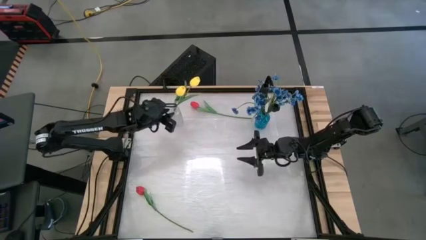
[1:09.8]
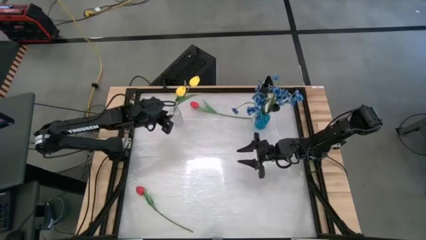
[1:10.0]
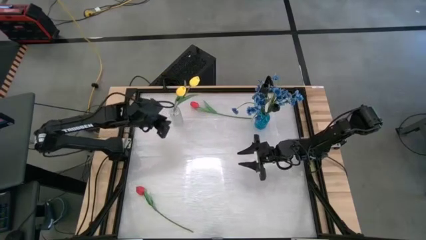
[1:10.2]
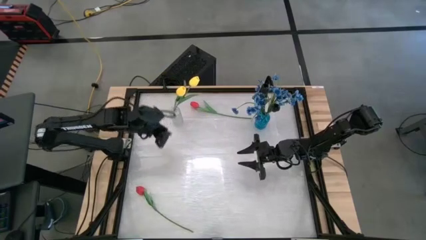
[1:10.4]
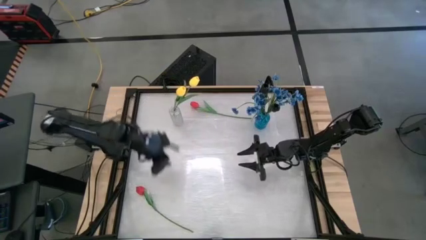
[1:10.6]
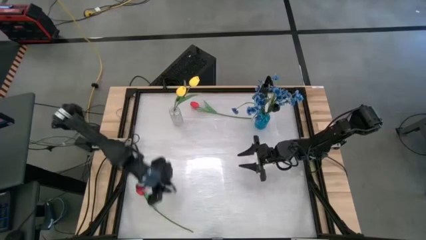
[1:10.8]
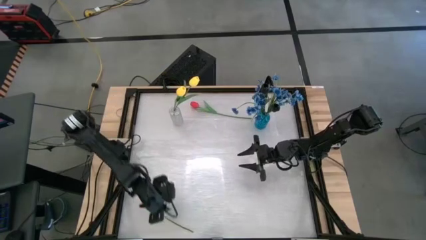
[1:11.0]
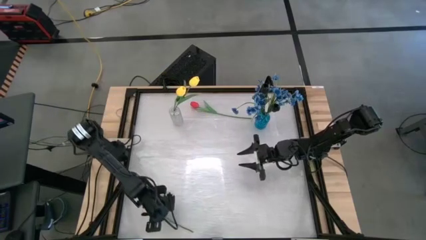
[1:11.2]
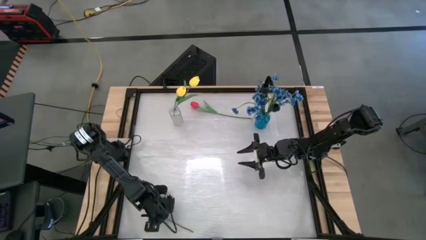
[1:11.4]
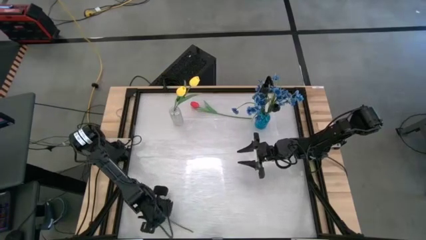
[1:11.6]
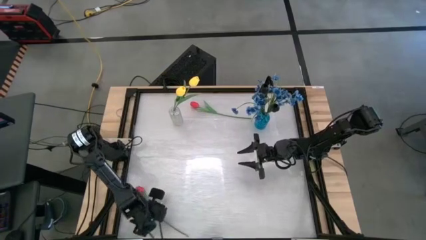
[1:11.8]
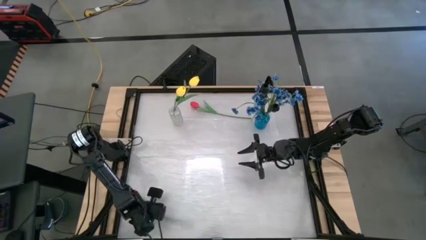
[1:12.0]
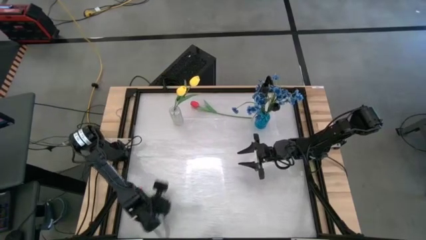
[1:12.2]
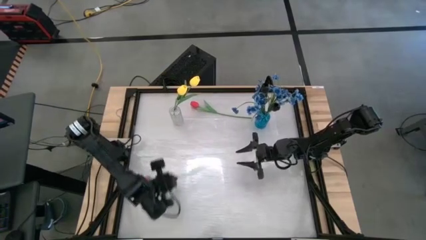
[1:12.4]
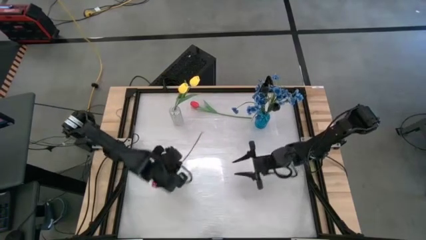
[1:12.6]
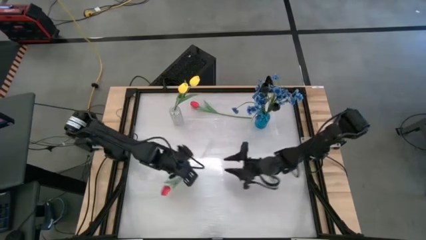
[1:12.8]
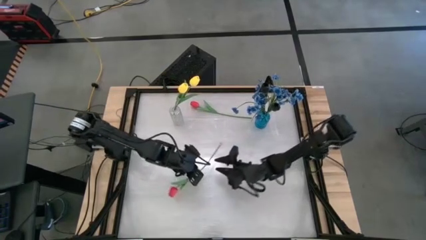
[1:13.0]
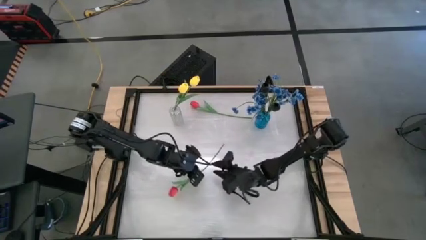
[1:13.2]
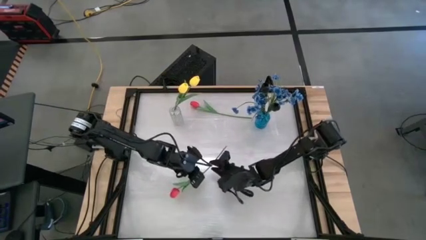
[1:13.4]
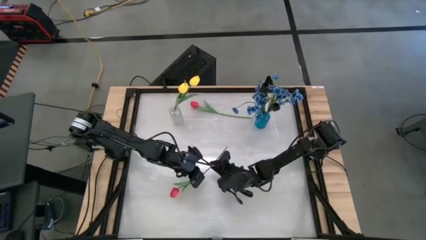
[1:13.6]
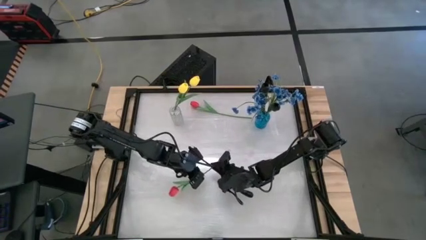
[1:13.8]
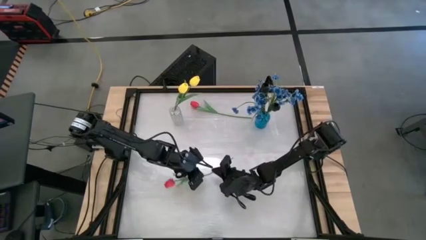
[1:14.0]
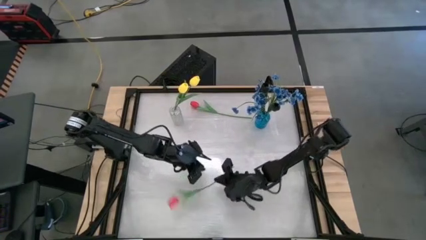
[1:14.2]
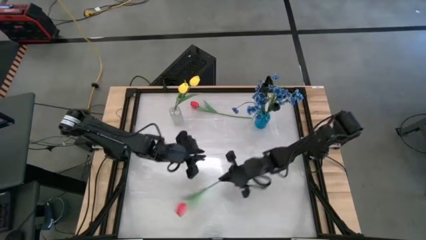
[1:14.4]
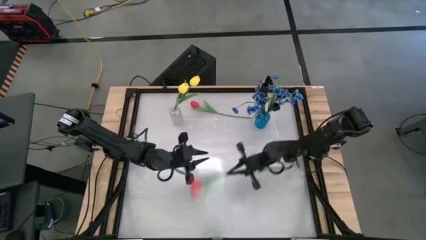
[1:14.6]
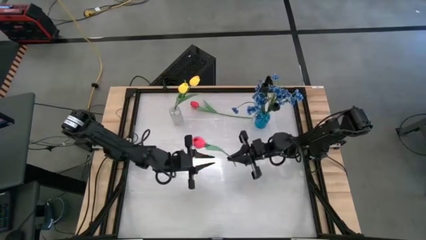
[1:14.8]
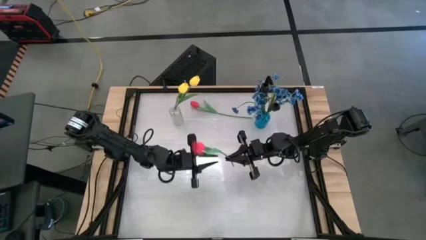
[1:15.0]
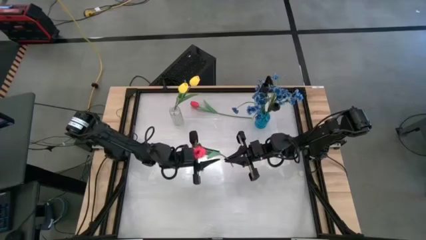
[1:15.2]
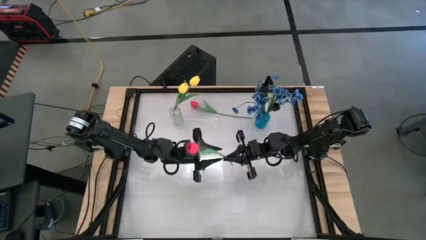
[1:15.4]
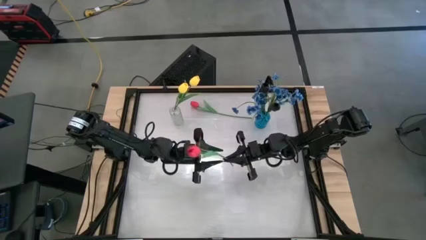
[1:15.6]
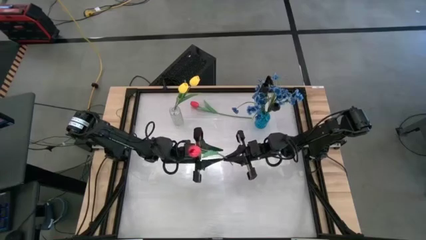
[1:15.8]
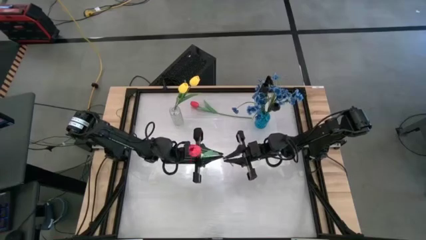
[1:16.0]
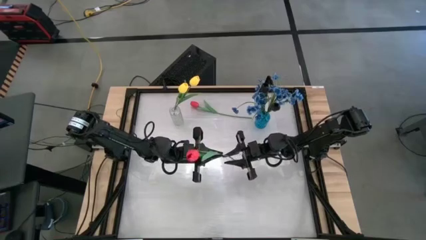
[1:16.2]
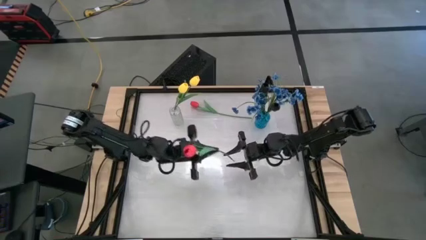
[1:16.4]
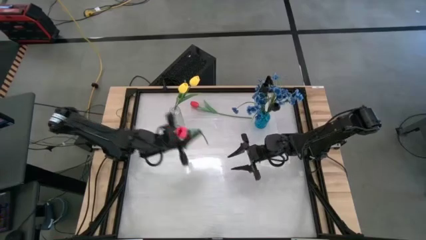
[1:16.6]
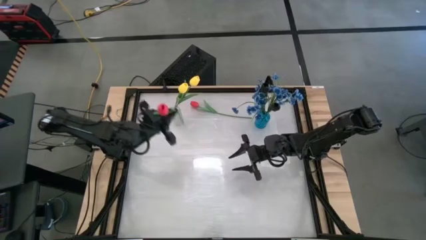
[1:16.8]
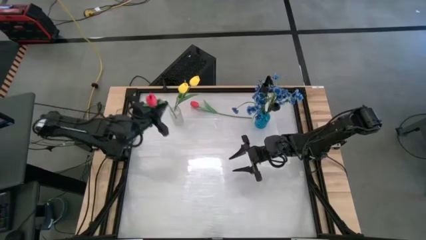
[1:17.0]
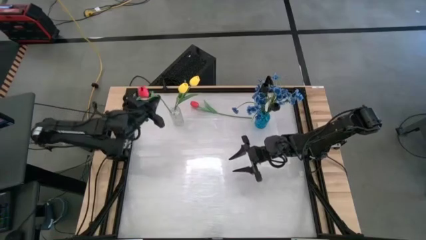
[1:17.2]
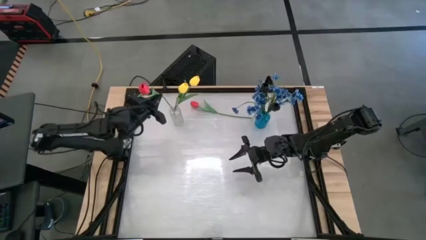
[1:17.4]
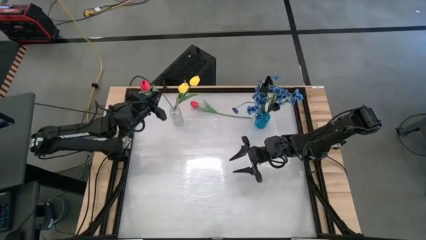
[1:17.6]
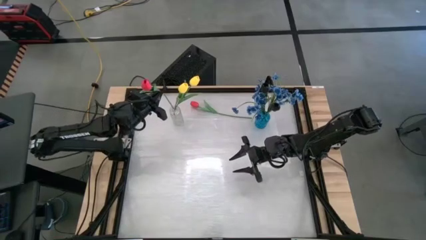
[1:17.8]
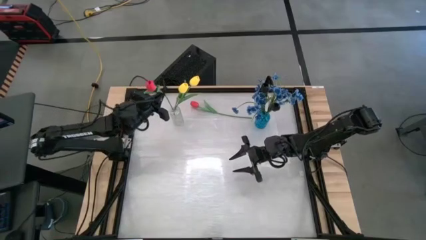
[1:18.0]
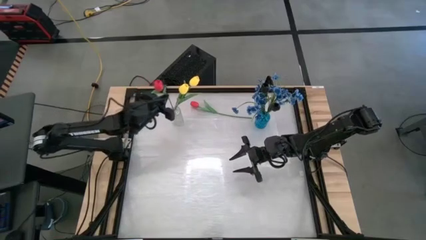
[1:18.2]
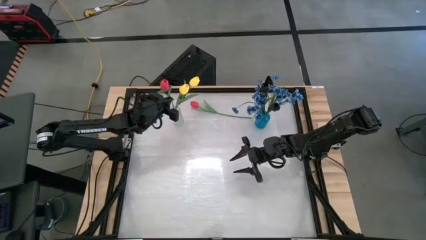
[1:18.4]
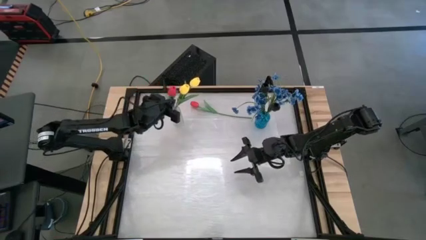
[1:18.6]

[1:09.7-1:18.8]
Task: Sort flowers into vase by color
Put the bottom red flower into the transparent vase

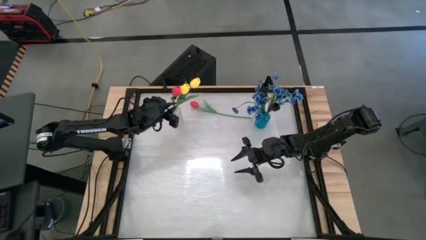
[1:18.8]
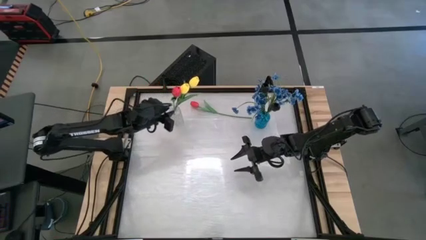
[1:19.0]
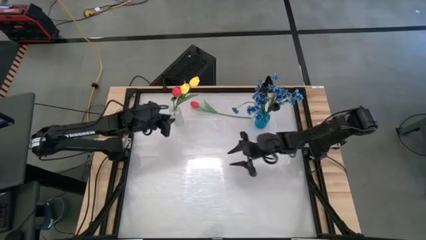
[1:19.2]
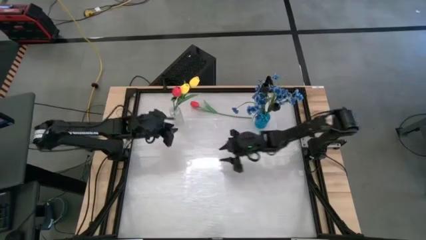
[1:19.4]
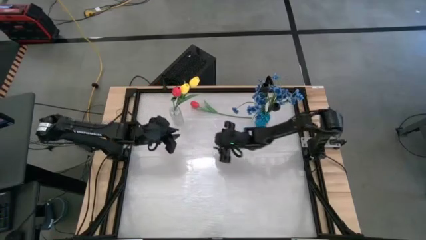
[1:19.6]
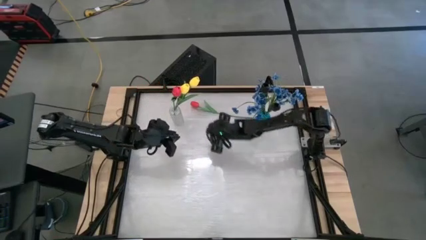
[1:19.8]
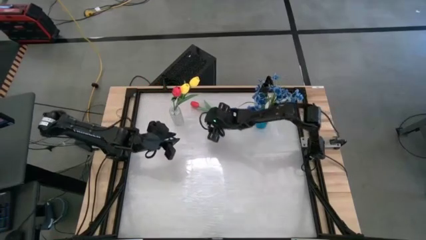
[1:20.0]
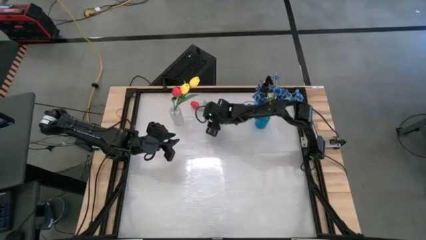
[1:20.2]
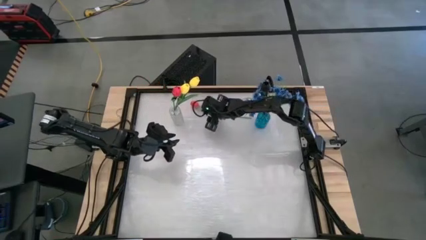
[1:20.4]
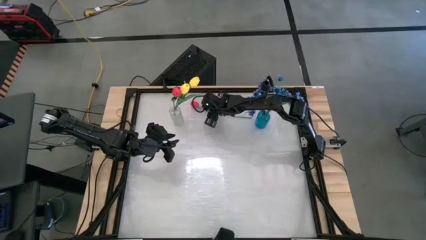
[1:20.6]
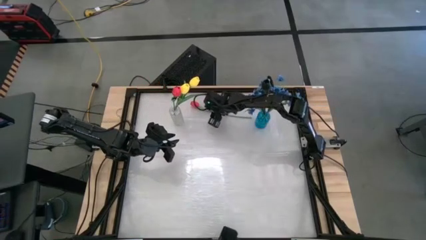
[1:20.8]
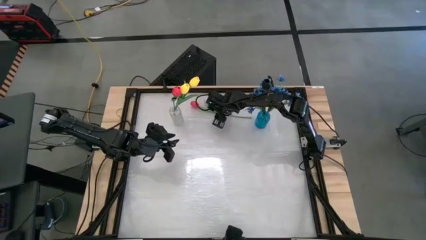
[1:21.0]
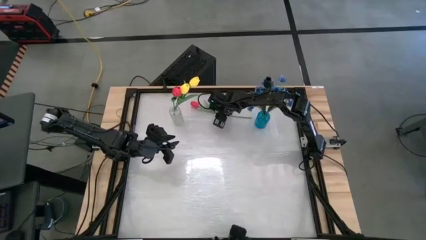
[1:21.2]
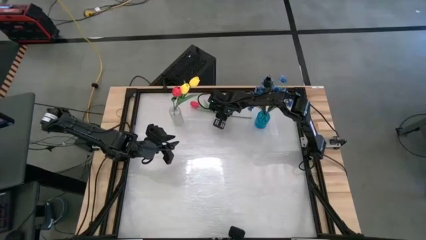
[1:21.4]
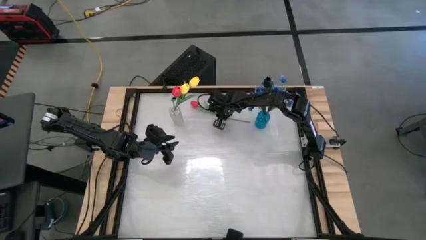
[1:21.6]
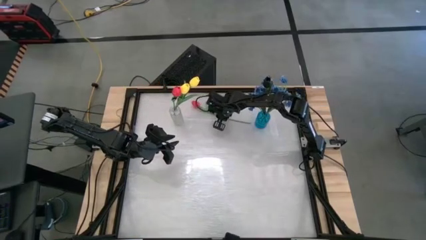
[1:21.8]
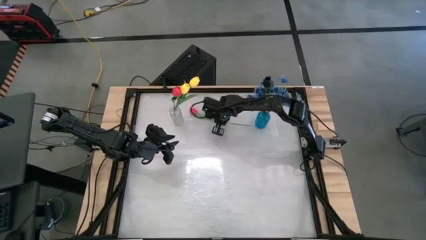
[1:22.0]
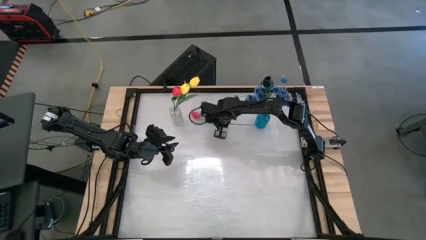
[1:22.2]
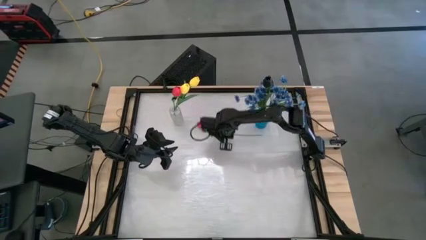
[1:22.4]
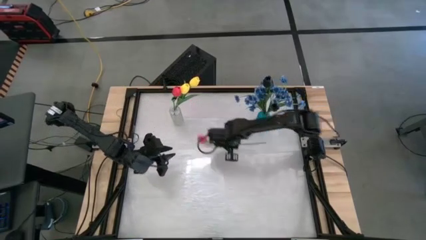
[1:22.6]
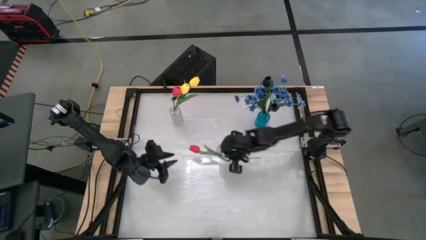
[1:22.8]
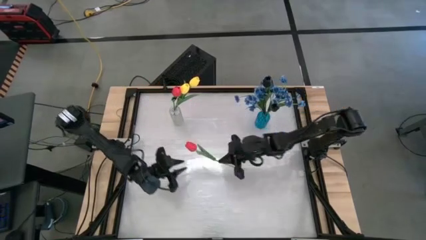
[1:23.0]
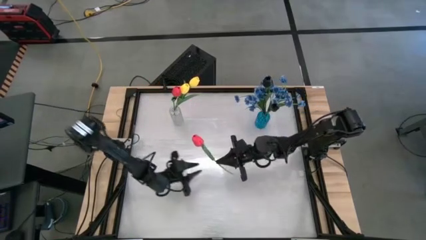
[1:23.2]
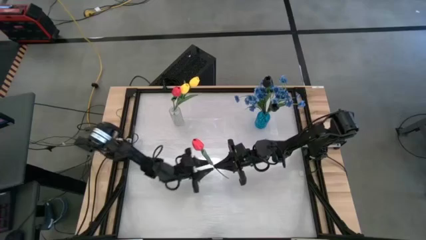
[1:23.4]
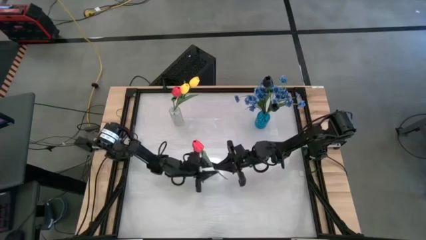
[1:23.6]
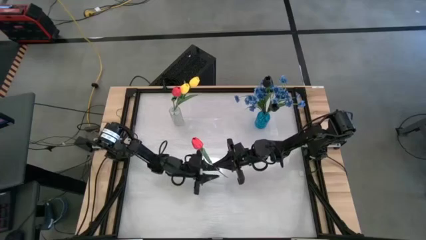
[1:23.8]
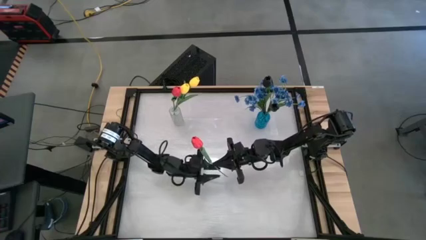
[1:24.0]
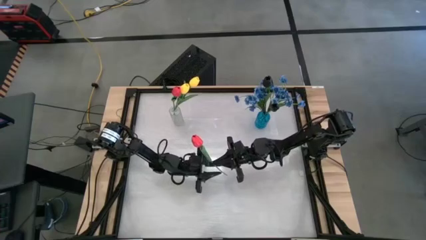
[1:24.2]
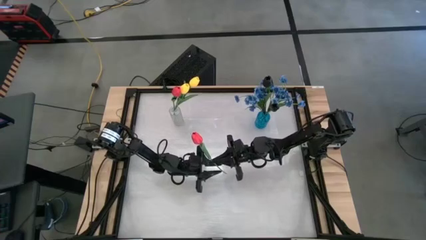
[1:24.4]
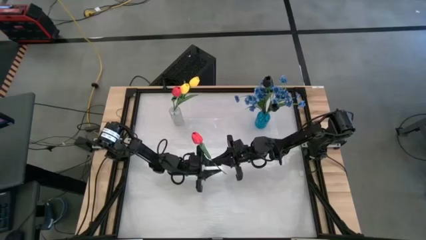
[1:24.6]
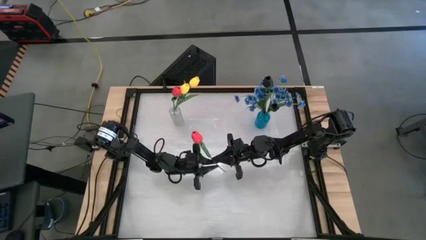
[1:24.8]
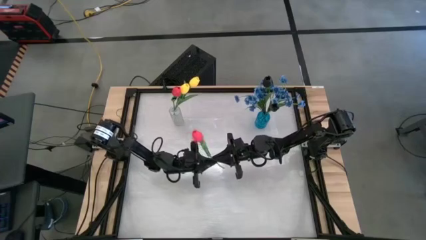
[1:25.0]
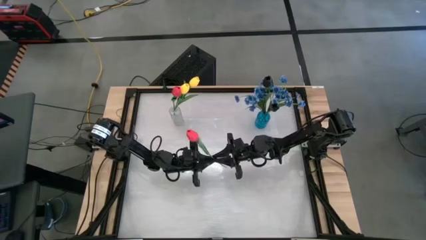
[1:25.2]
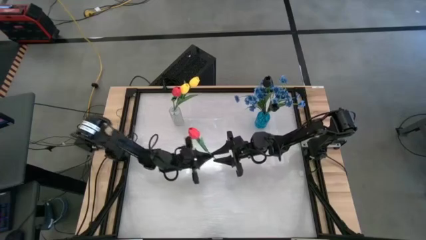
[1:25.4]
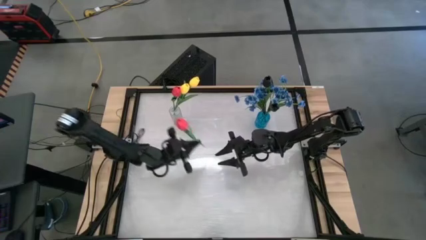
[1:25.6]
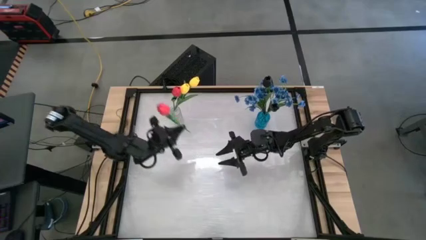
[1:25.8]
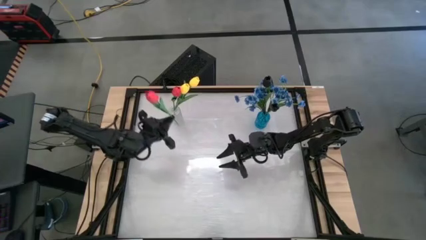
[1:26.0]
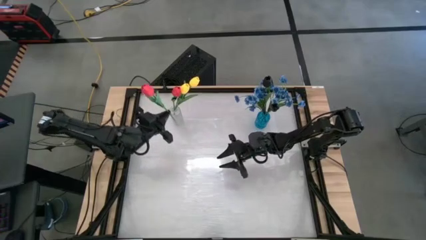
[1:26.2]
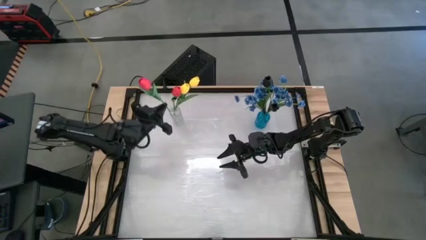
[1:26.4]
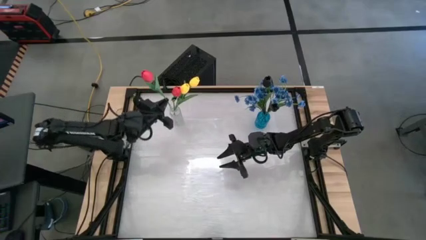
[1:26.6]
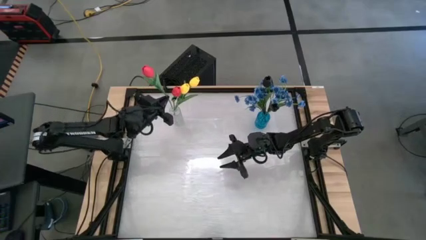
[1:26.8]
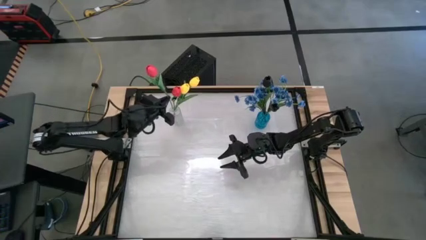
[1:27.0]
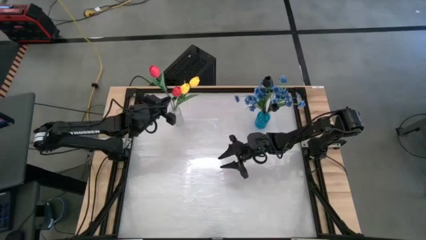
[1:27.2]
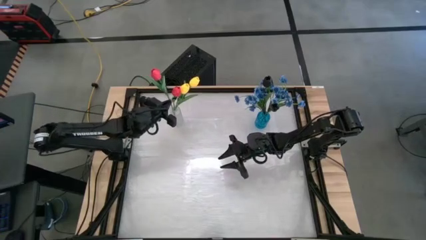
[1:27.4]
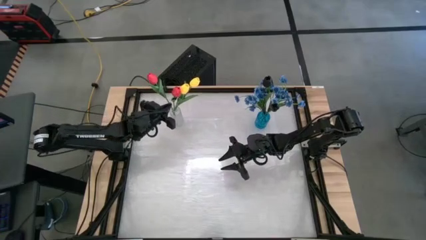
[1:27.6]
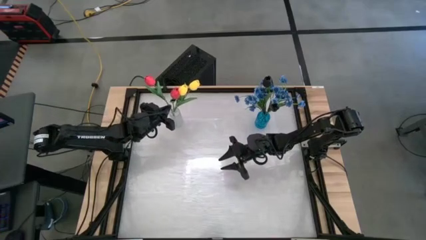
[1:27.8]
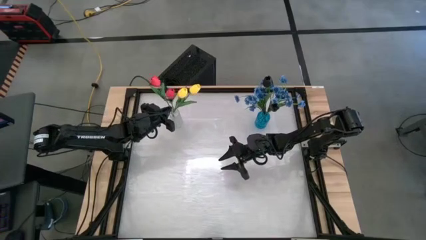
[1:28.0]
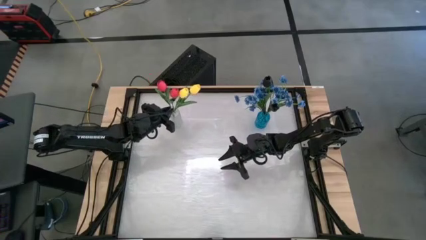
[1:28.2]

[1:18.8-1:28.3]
Put the red flower into the transparent vase
